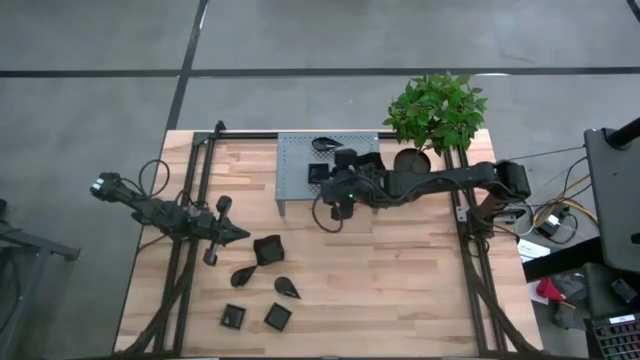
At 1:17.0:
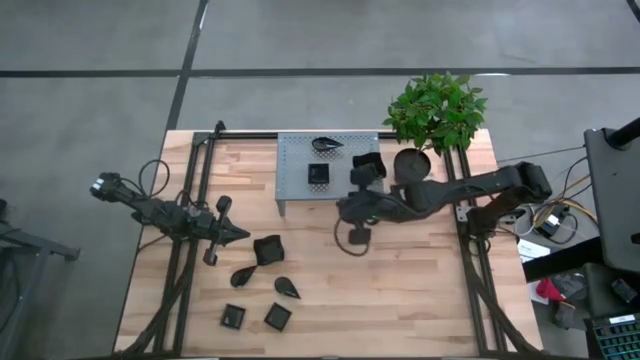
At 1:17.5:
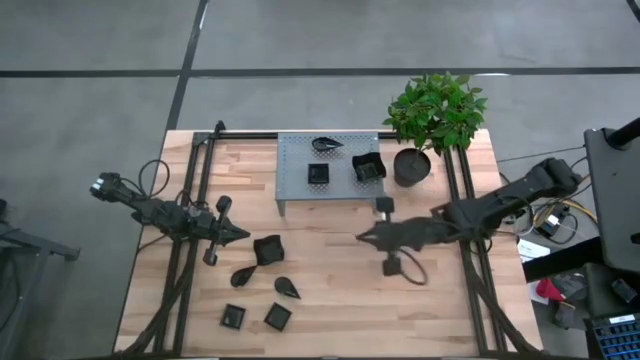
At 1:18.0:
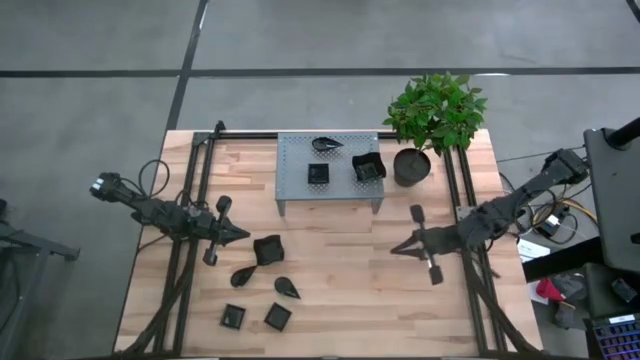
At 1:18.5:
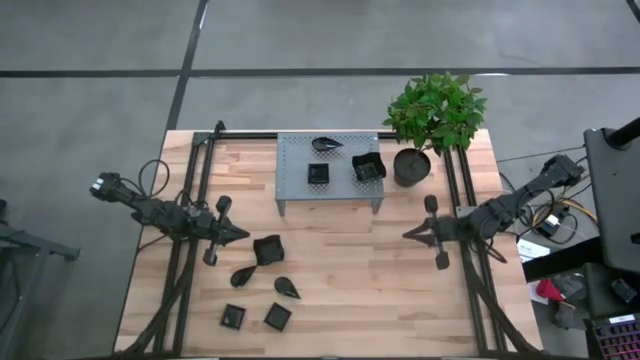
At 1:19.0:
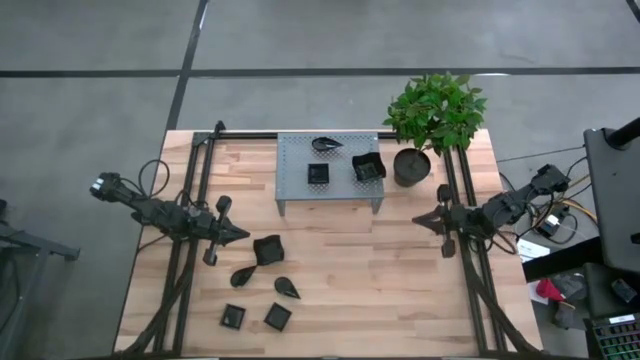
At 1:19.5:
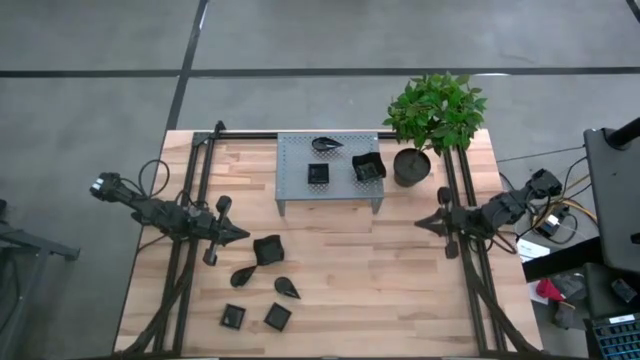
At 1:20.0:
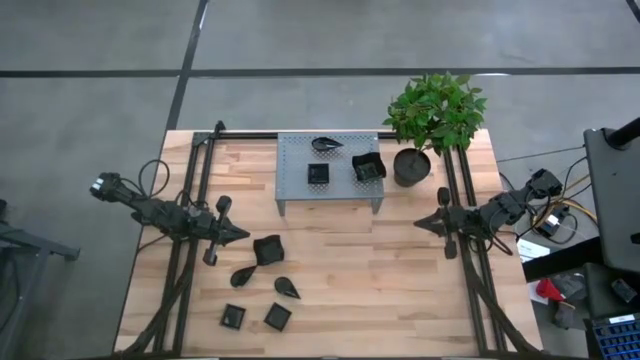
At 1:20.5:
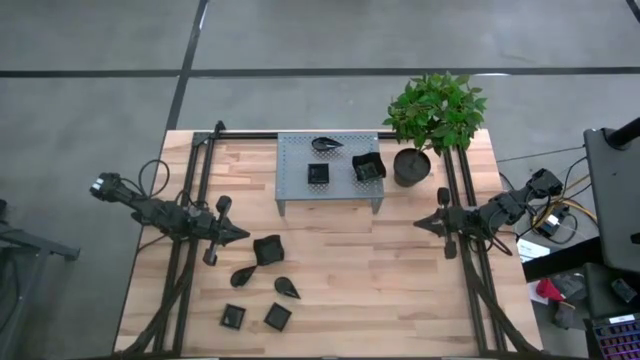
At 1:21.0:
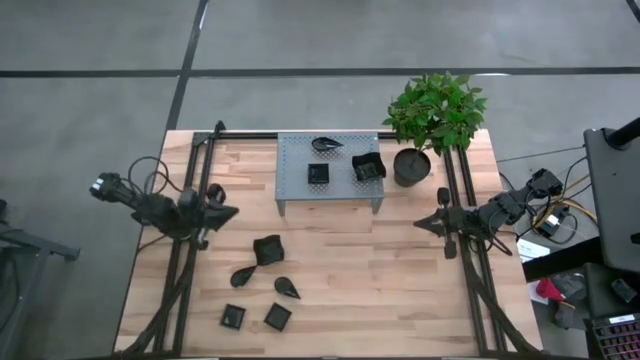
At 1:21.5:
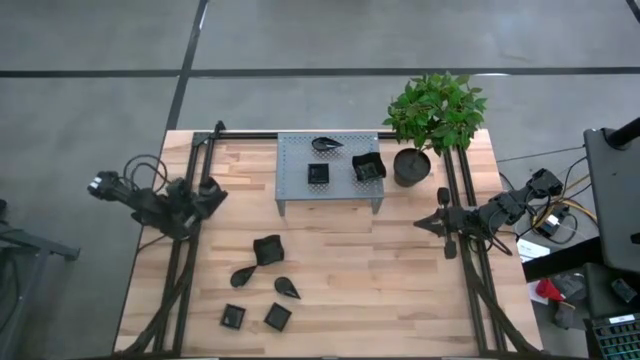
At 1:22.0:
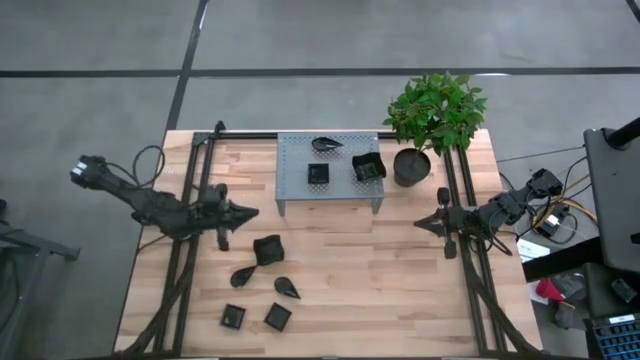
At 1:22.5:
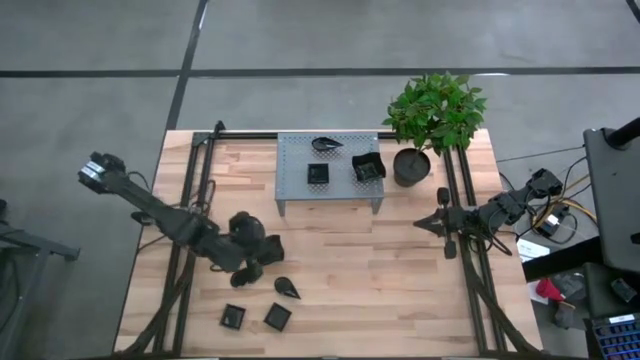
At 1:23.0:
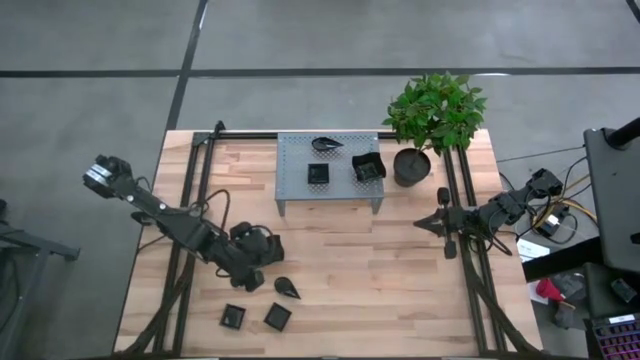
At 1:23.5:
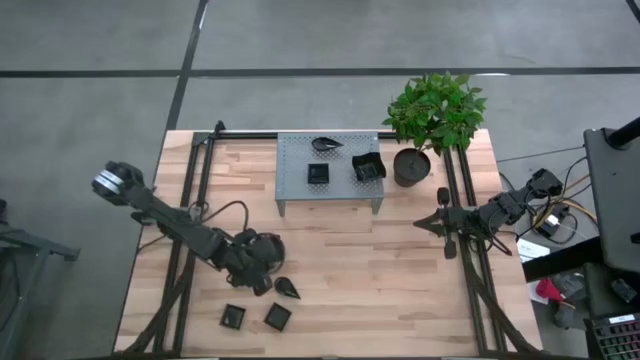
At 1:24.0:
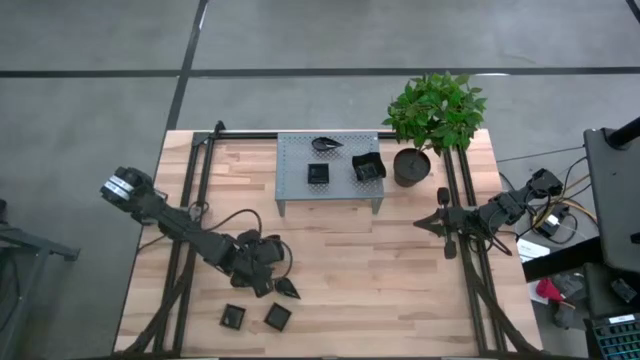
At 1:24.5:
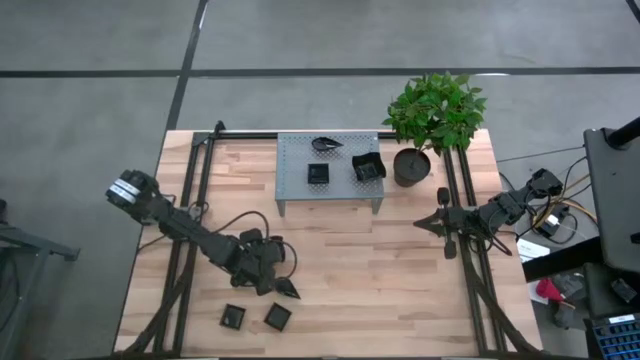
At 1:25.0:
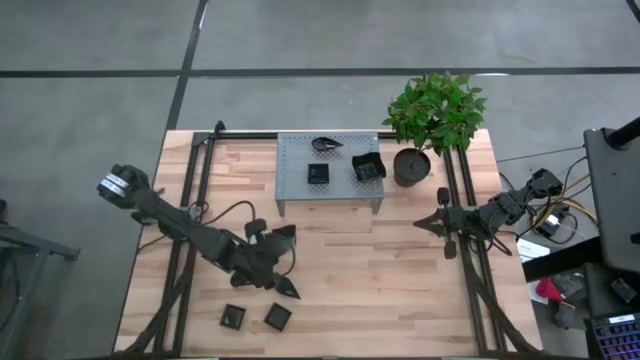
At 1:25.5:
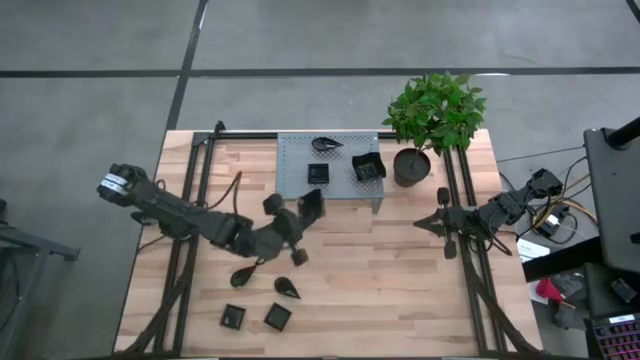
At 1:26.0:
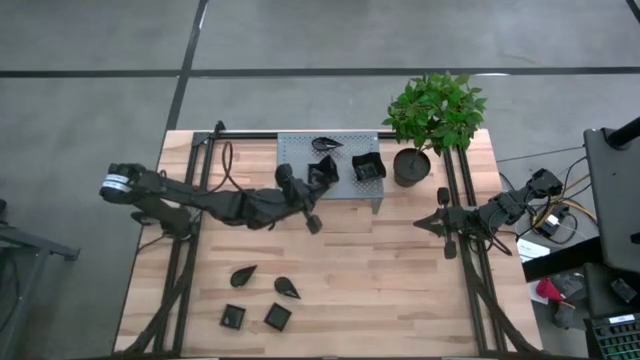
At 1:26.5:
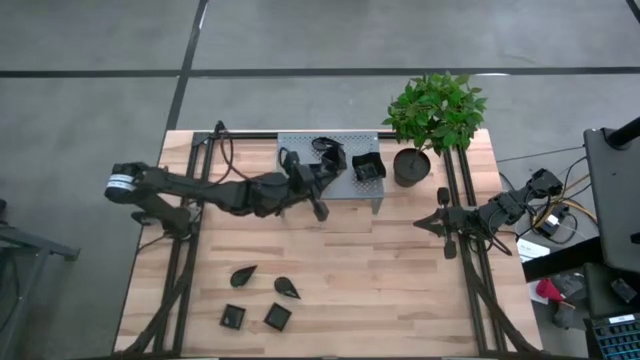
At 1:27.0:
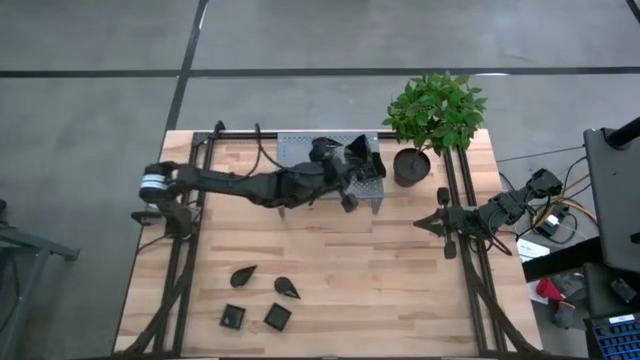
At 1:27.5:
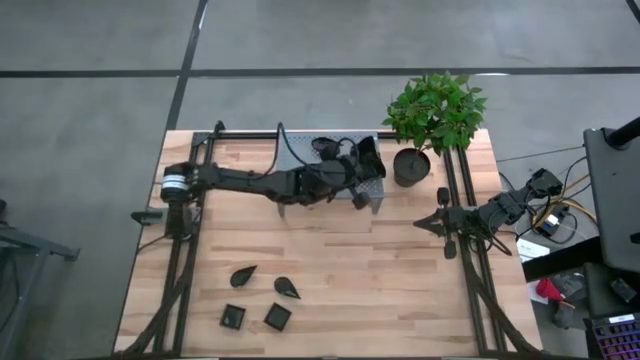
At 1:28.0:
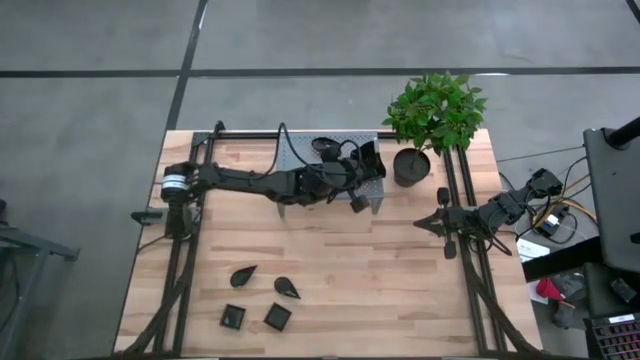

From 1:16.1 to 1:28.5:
Task: Pick & Place Mini shaped plates
Stack the black distorted square plate on top of the black distorted square plates on the shelf

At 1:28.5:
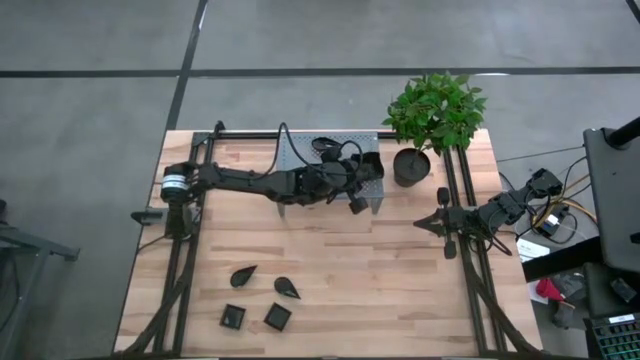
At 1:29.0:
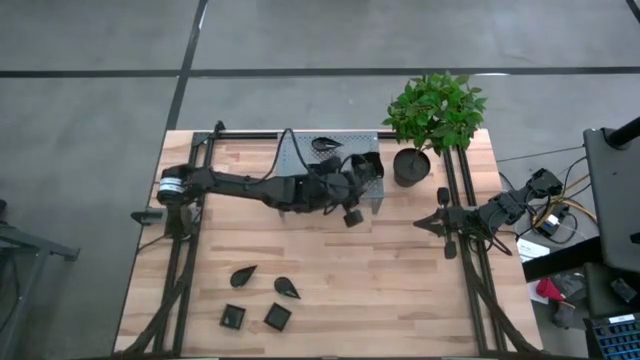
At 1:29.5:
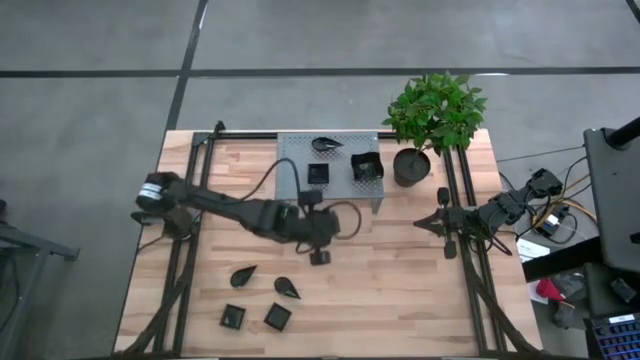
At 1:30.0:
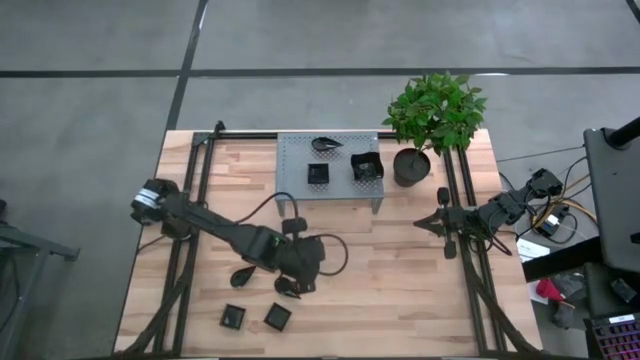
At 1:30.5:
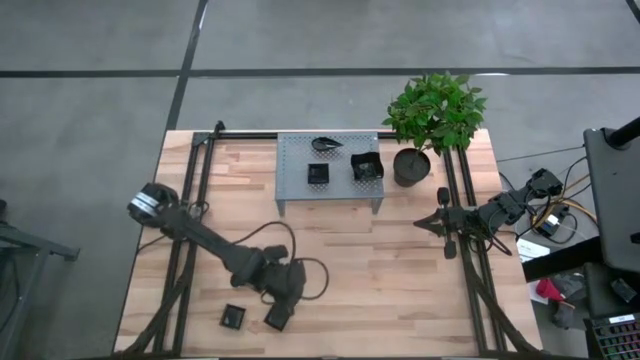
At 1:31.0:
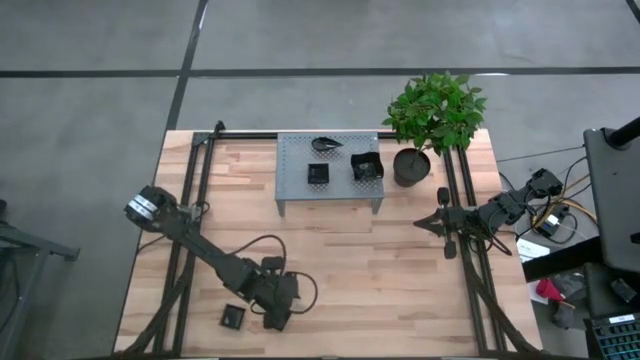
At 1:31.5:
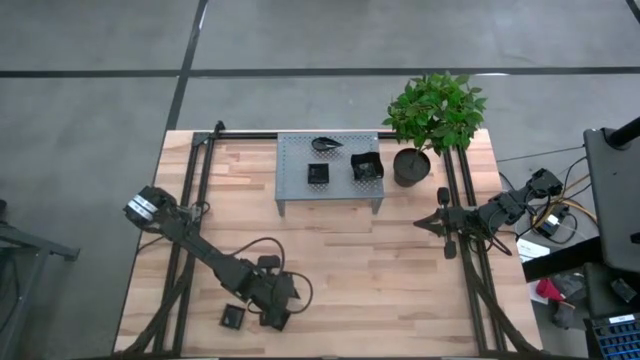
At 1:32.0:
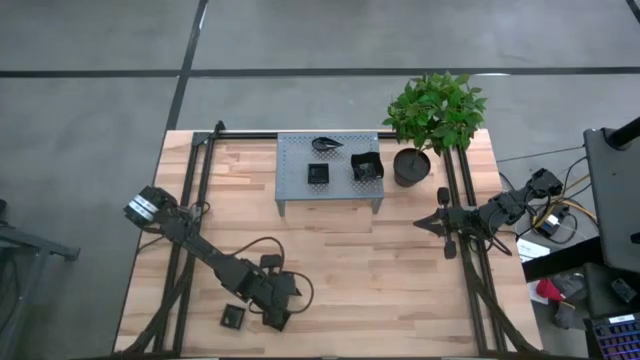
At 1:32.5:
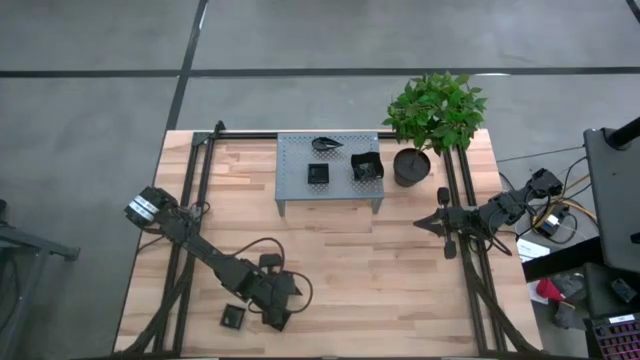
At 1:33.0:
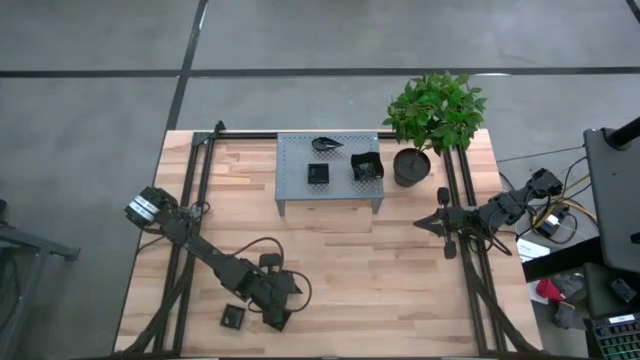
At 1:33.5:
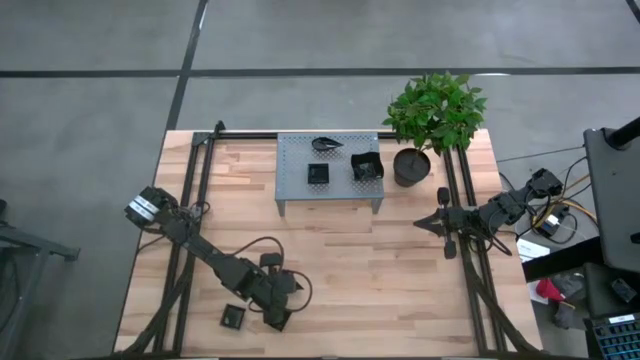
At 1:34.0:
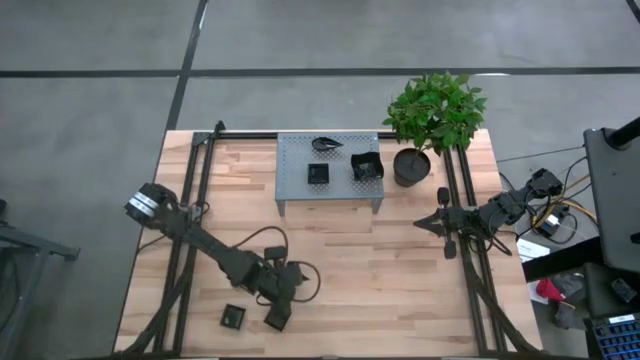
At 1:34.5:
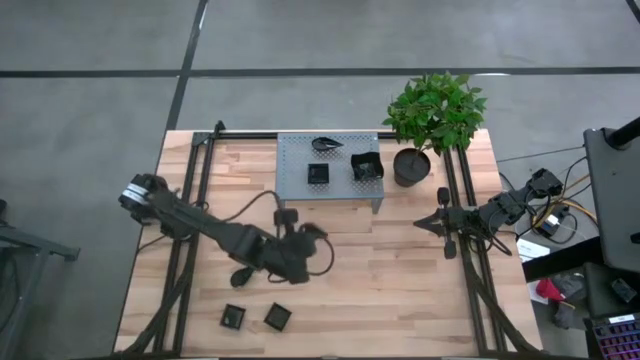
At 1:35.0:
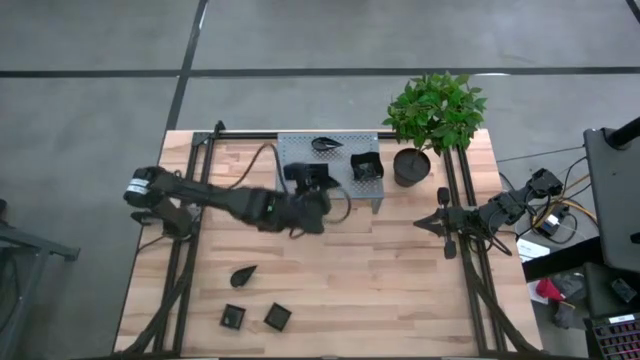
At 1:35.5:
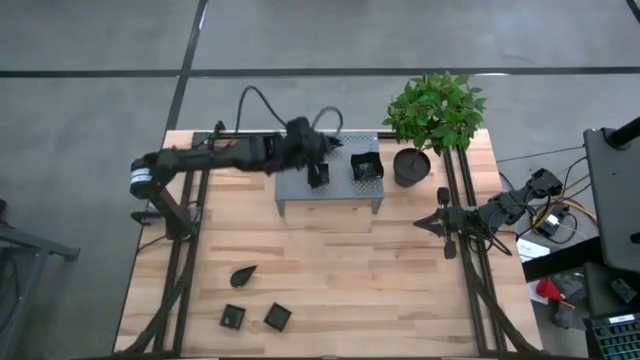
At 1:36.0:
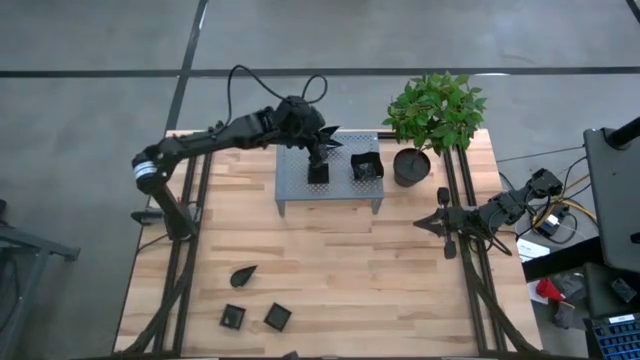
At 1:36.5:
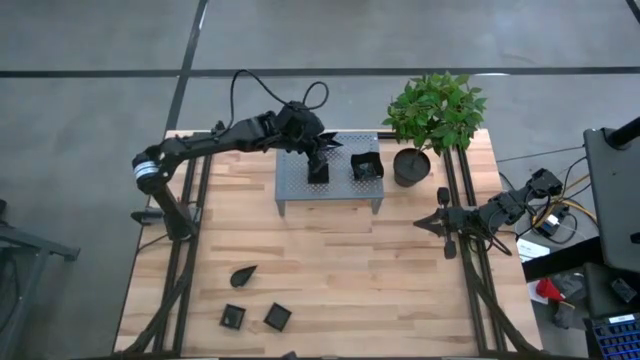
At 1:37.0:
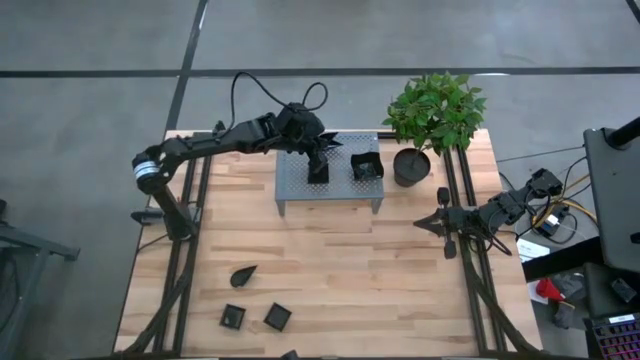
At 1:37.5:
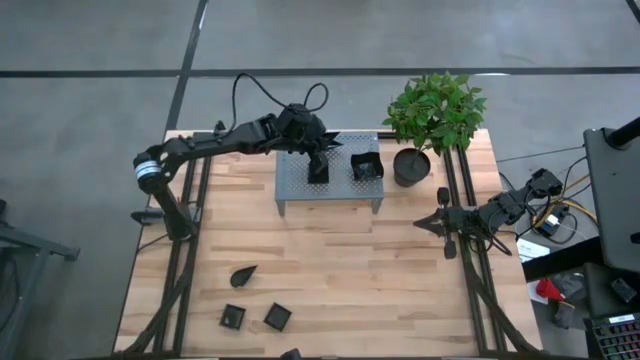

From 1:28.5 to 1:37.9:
Stack the black drop-shaped plate on top of the black drop-shaped plates on the shelf
